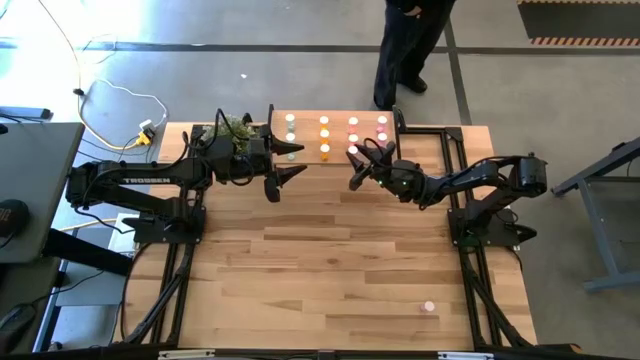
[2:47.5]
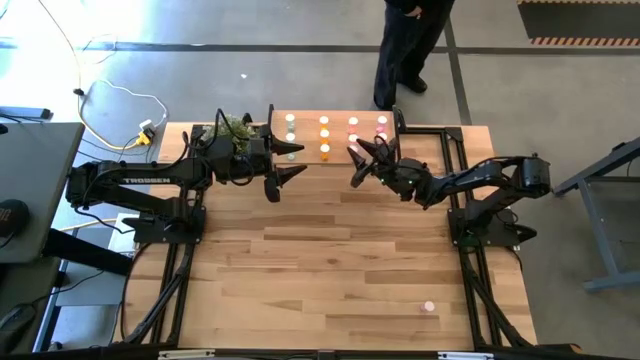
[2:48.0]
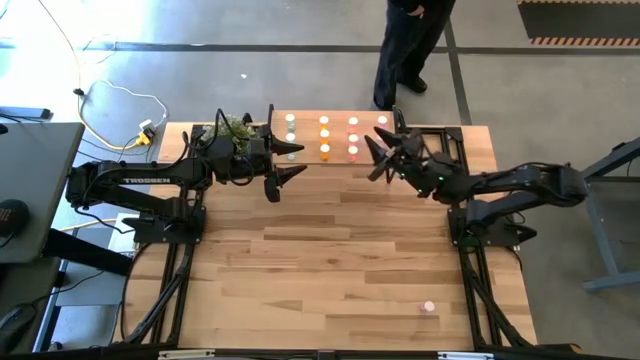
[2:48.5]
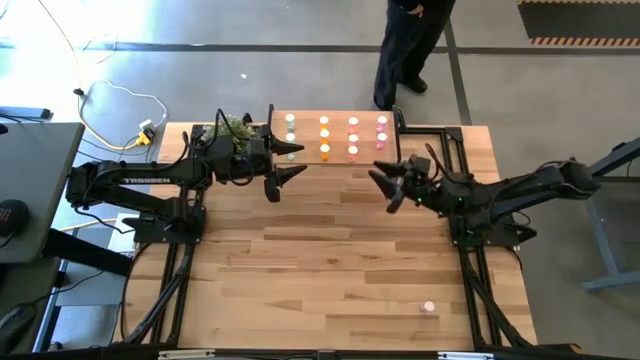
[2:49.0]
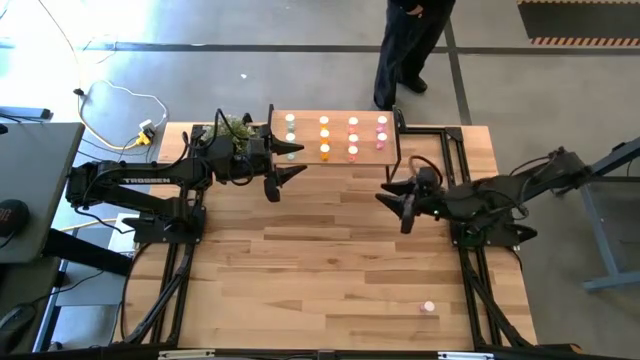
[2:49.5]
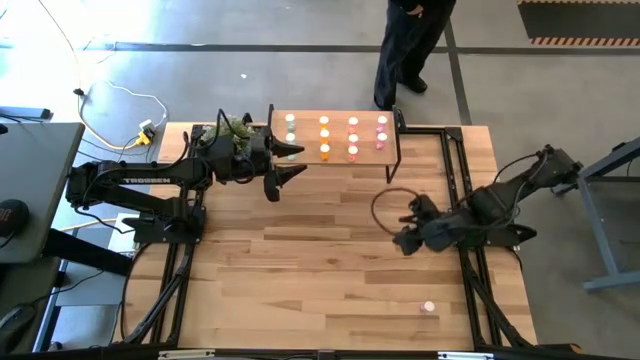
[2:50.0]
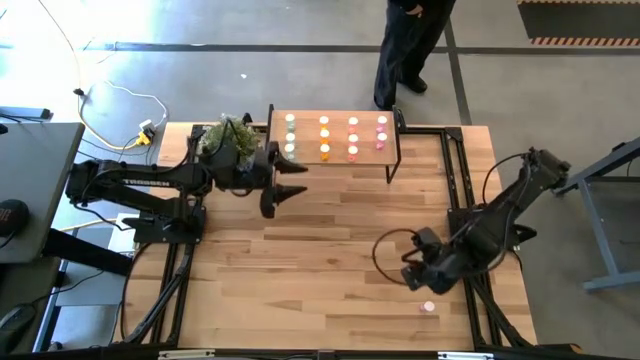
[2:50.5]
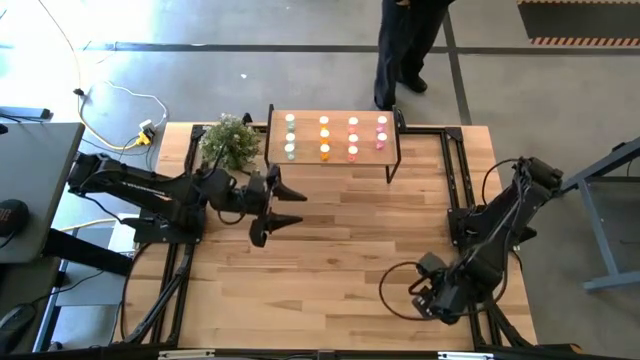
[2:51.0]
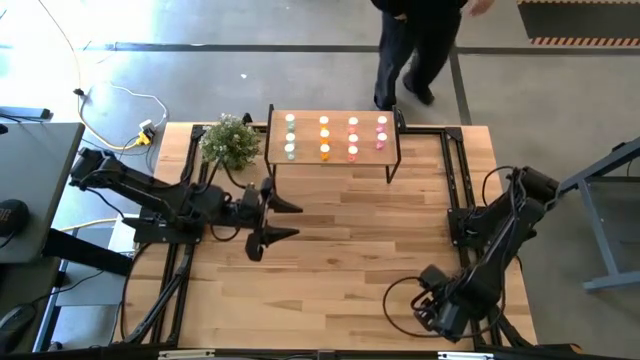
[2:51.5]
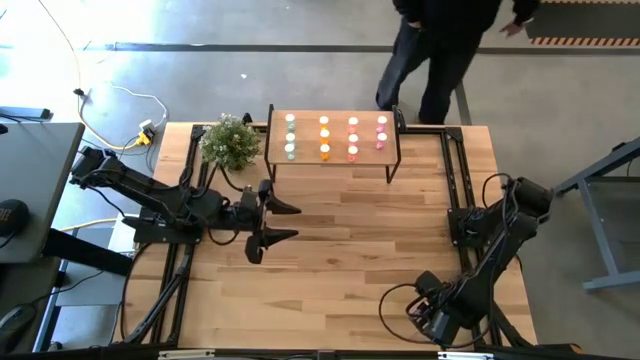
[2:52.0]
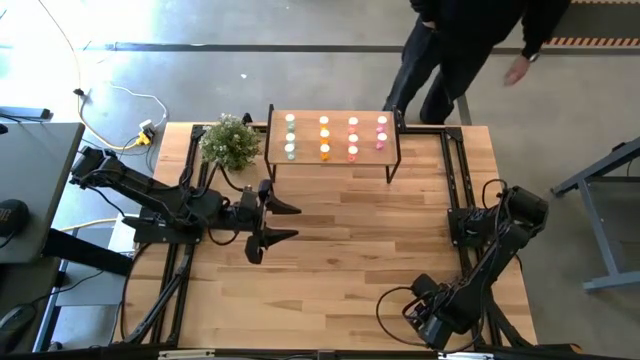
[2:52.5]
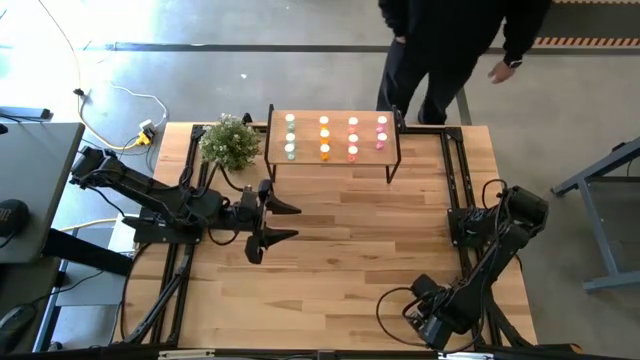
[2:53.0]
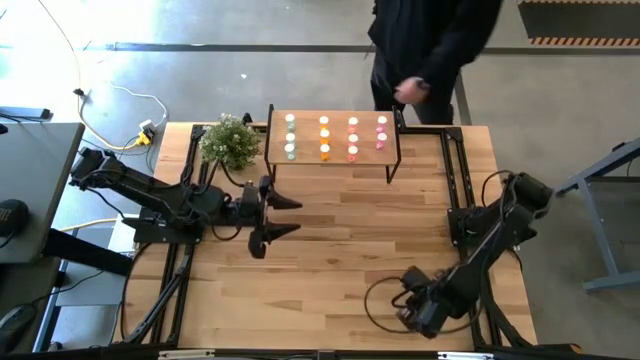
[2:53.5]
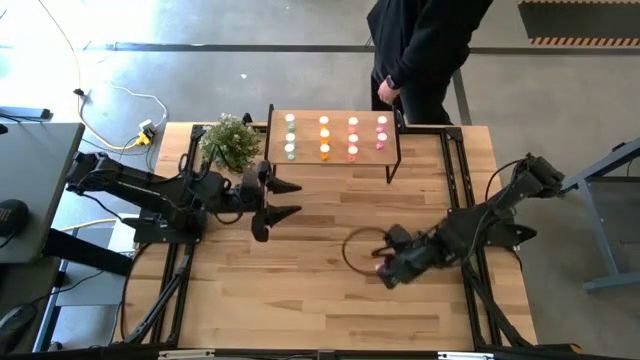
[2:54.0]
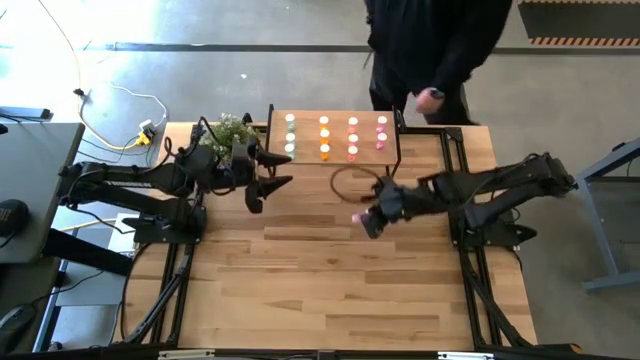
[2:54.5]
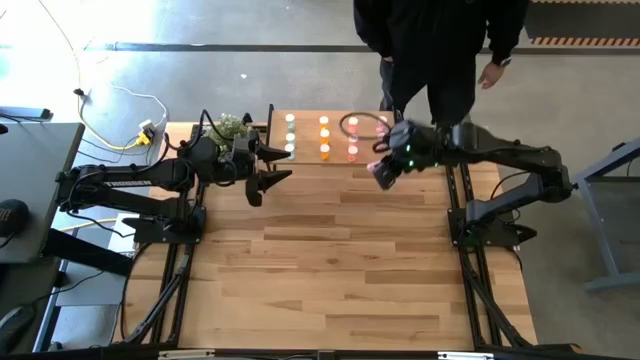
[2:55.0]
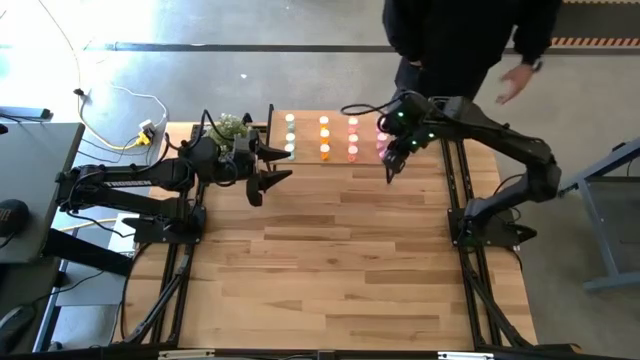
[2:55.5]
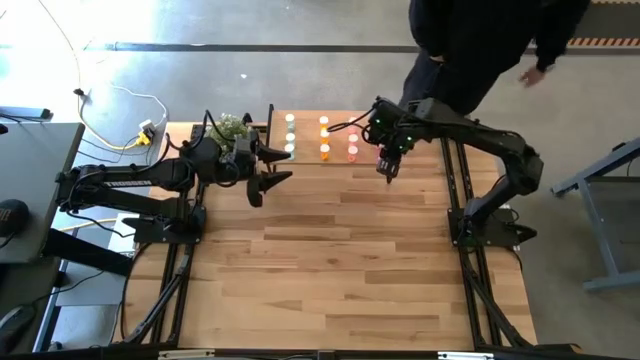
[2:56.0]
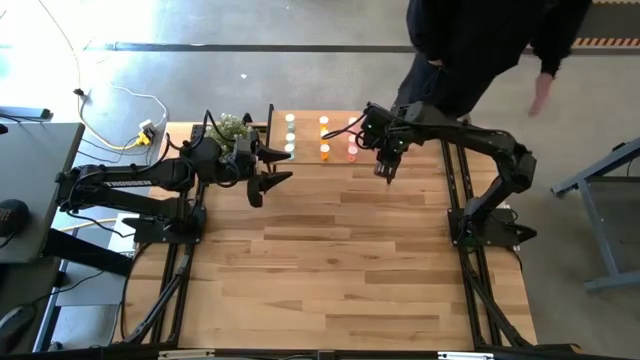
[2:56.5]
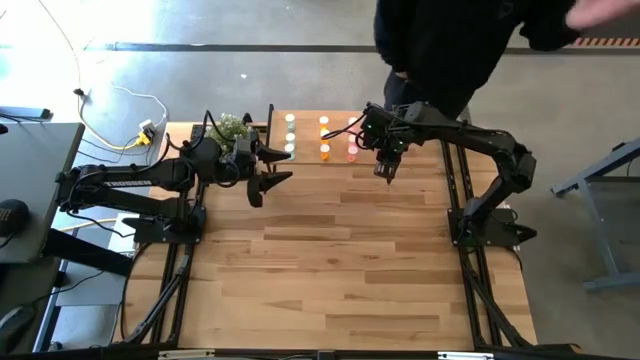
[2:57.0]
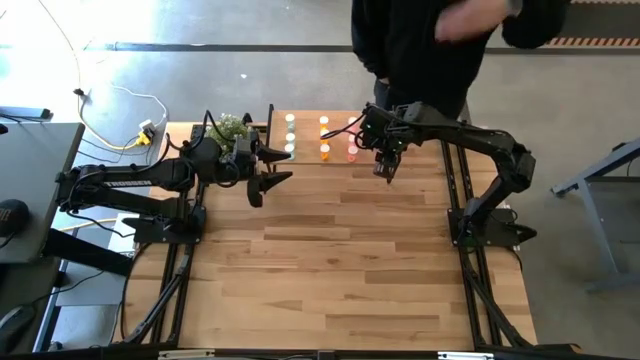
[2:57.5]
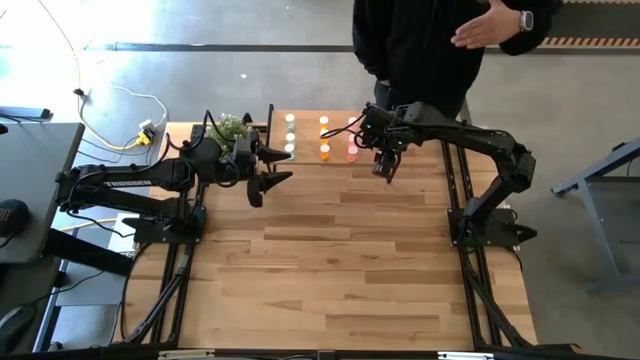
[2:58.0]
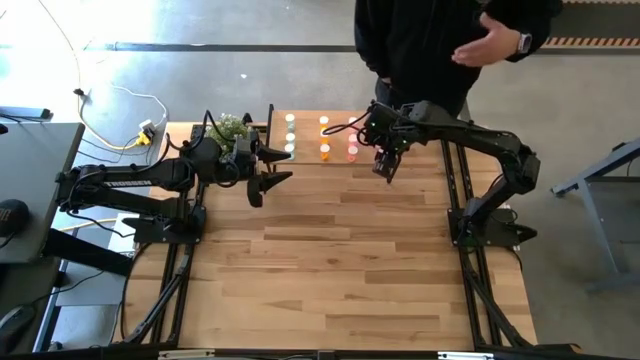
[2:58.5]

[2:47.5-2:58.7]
Task: Pick and place medicine bottles onto shelf by color
Put the violet pill bottle on the shelf aligned with the other violet pill bottles

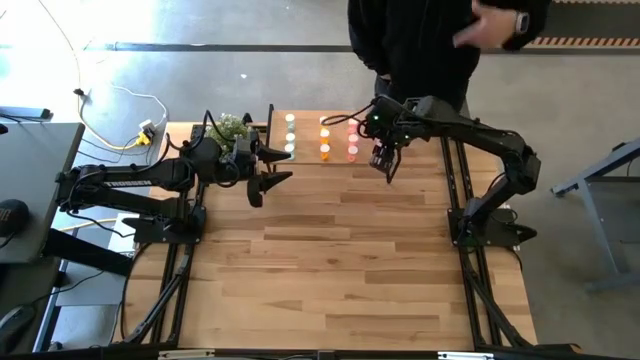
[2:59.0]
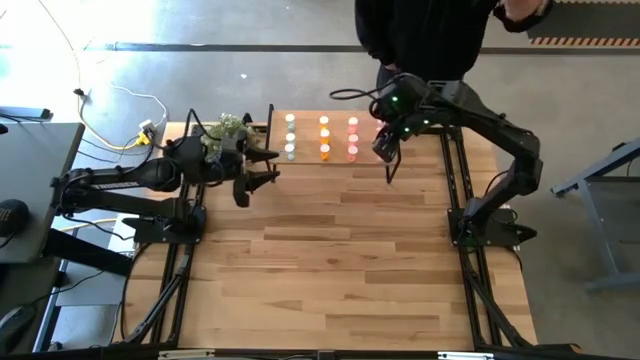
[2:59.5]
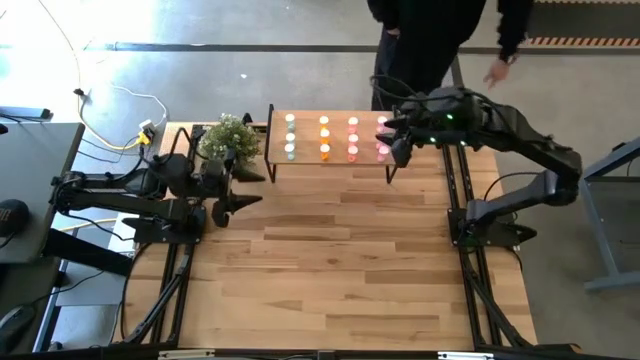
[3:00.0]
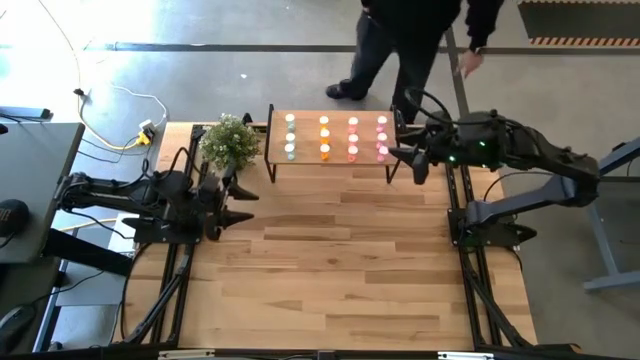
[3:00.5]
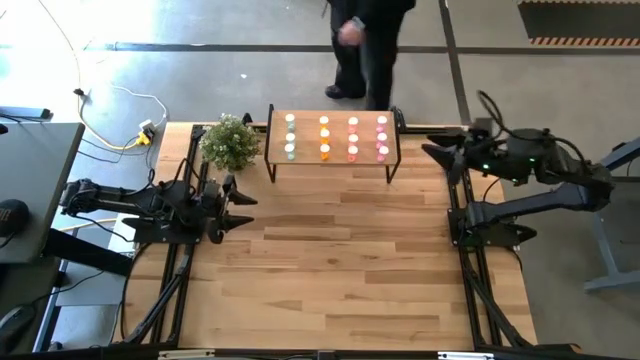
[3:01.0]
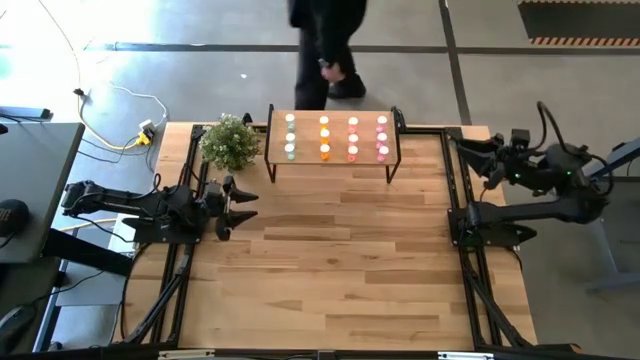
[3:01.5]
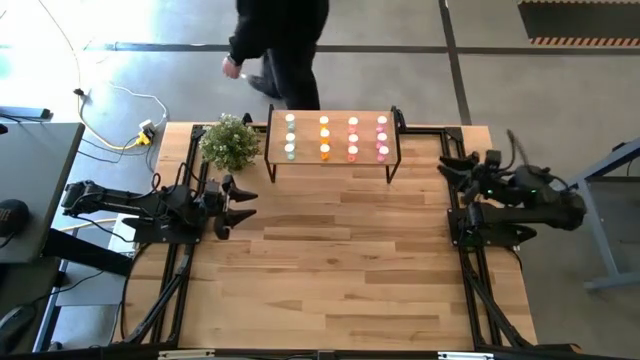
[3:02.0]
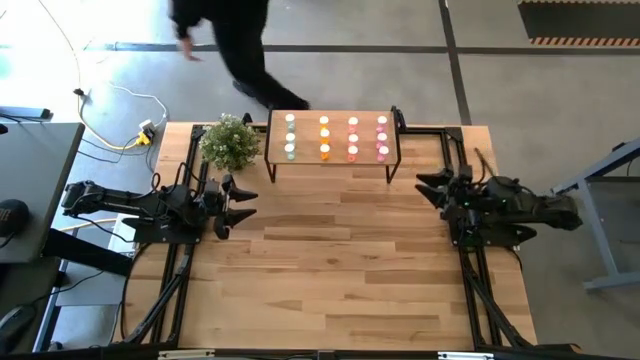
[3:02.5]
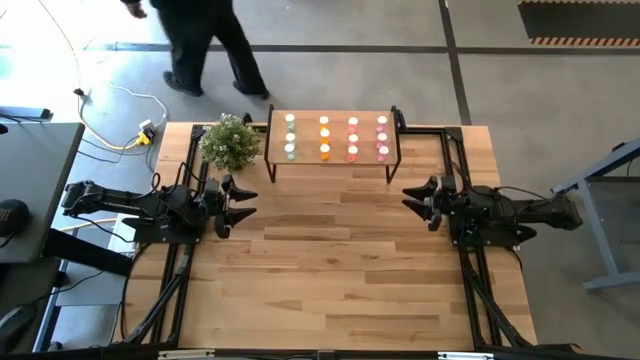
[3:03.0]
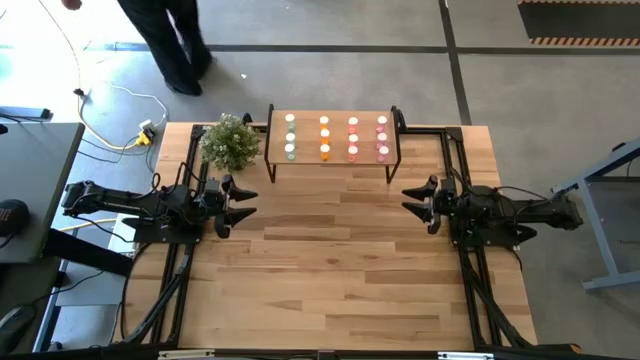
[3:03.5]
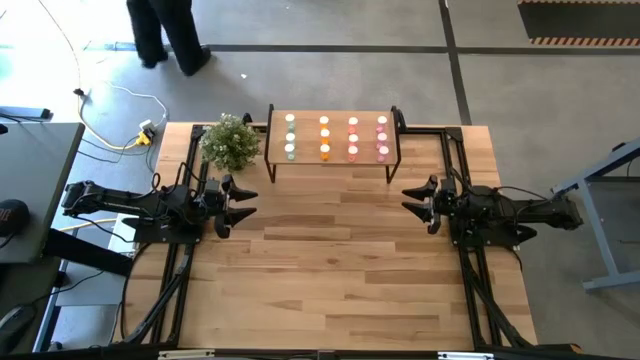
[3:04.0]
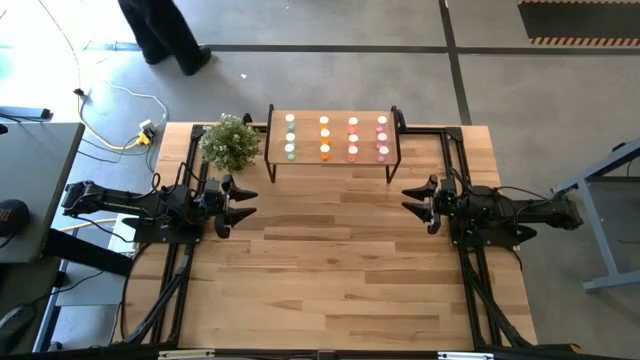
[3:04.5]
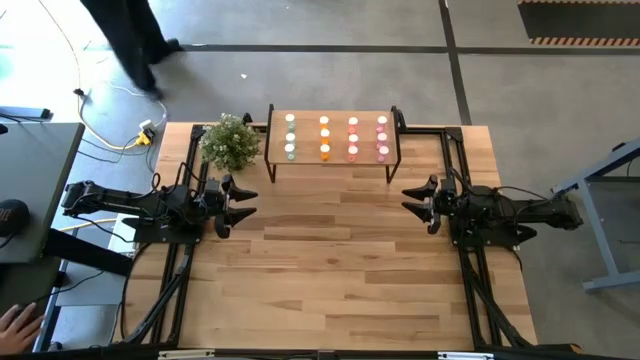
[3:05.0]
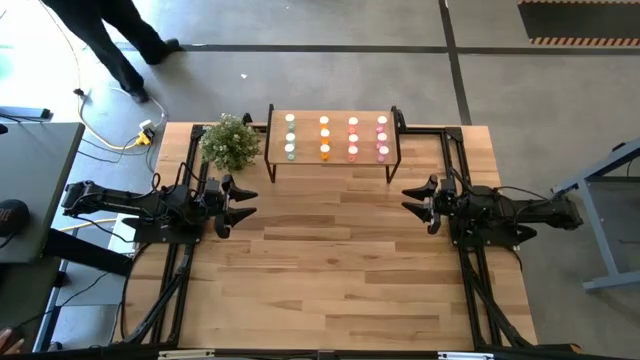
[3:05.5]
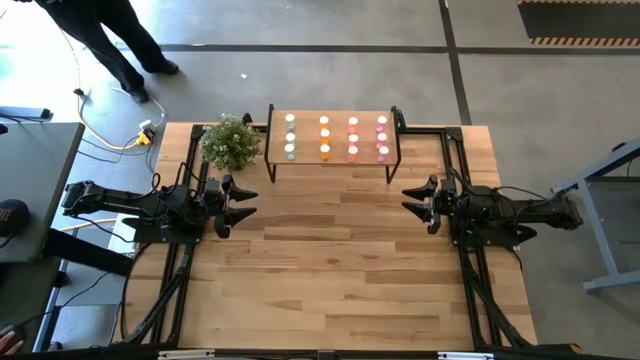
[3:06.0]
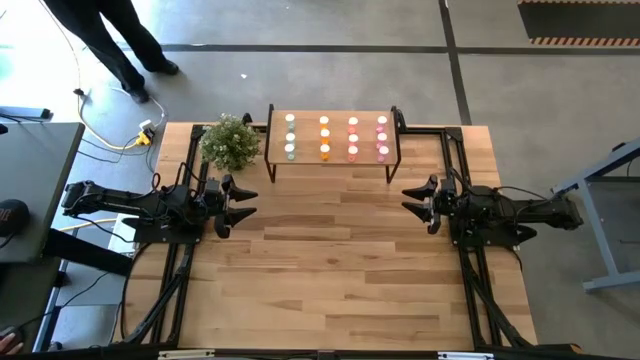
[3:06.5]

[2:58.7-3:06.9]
Return to Home Position
